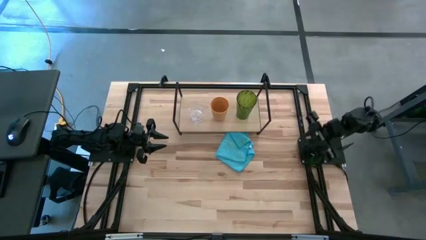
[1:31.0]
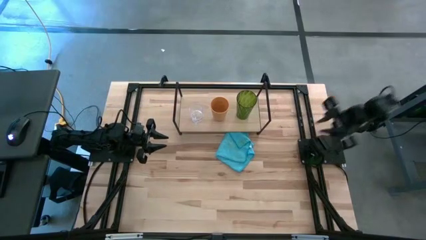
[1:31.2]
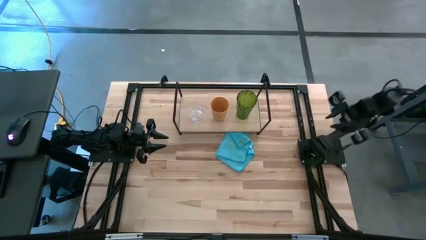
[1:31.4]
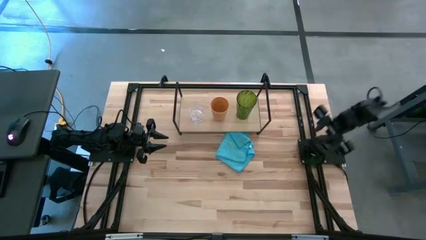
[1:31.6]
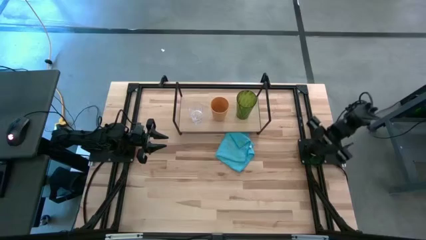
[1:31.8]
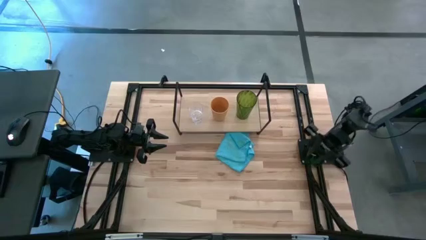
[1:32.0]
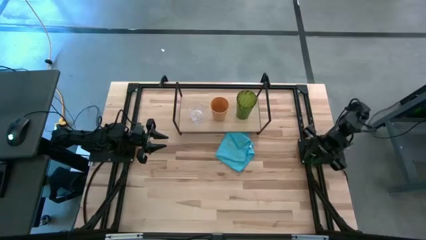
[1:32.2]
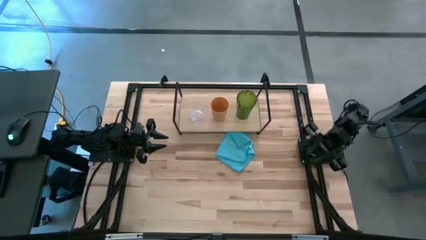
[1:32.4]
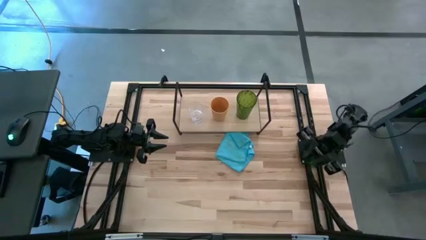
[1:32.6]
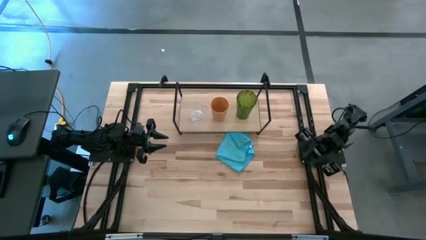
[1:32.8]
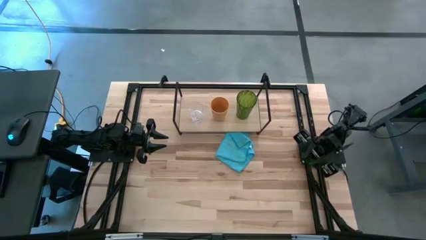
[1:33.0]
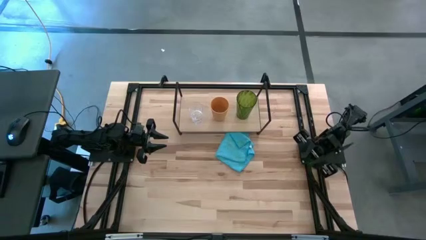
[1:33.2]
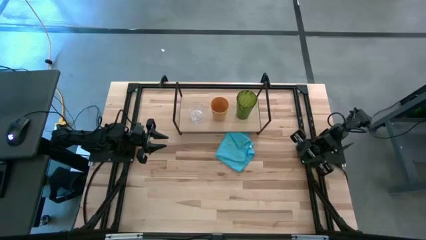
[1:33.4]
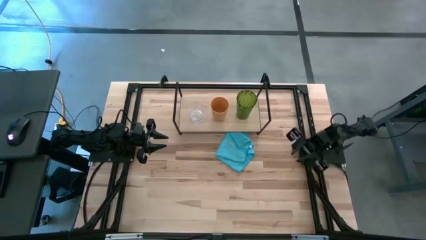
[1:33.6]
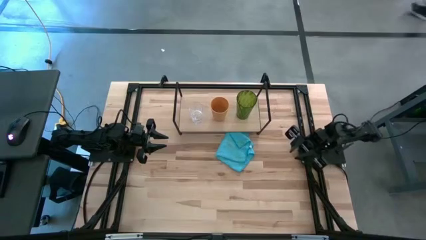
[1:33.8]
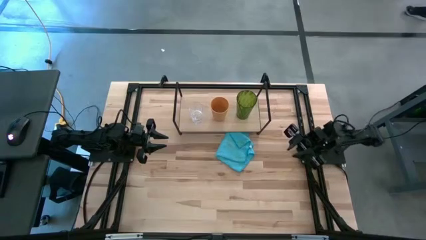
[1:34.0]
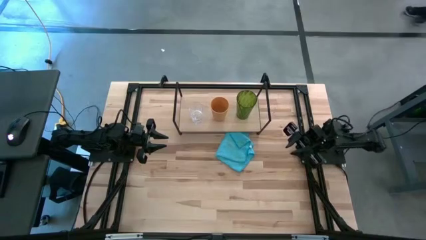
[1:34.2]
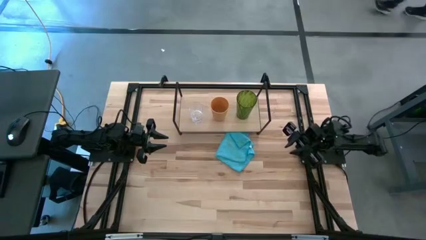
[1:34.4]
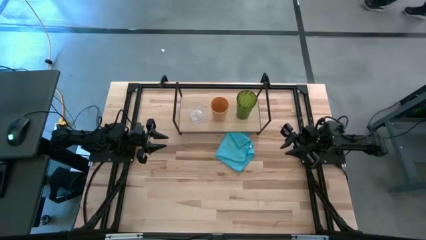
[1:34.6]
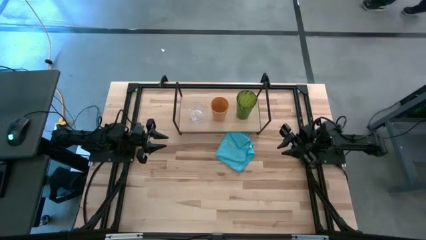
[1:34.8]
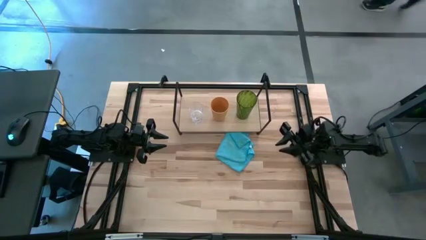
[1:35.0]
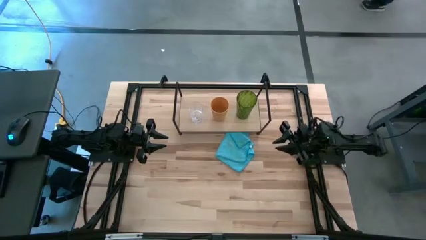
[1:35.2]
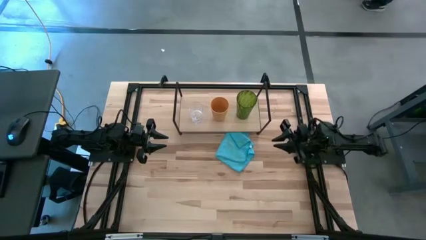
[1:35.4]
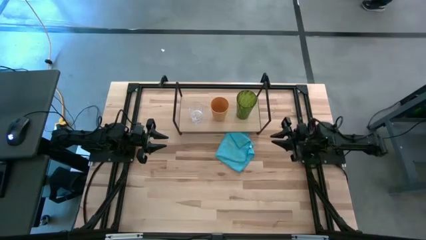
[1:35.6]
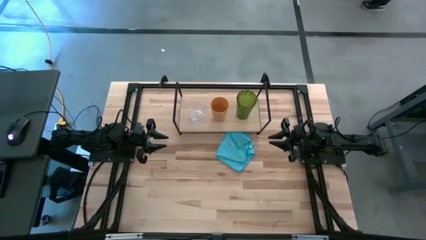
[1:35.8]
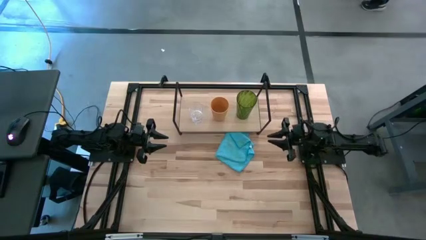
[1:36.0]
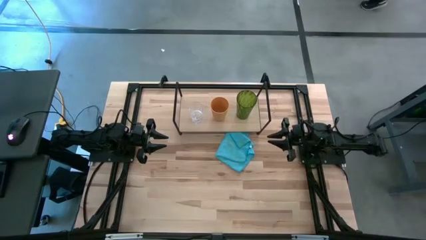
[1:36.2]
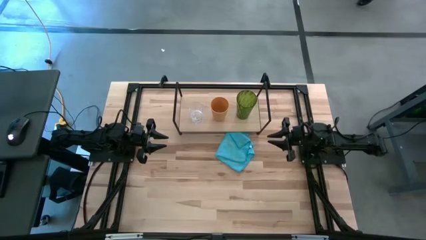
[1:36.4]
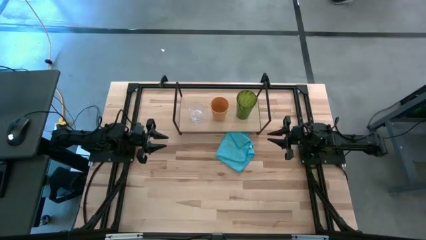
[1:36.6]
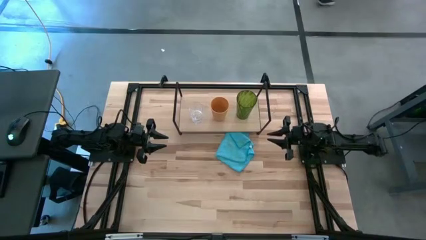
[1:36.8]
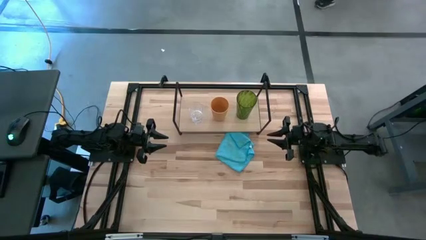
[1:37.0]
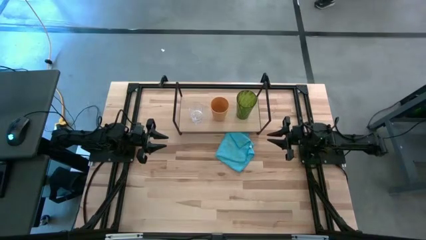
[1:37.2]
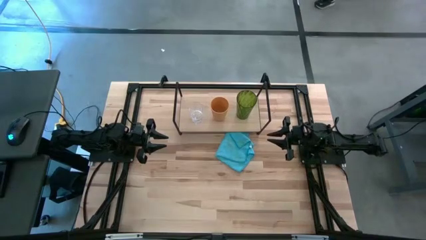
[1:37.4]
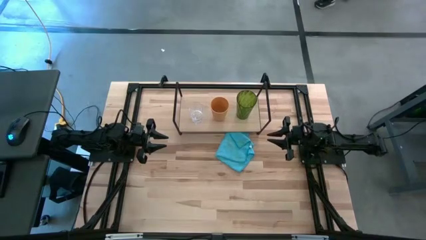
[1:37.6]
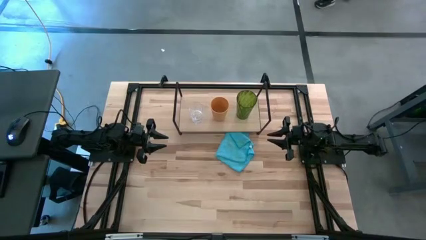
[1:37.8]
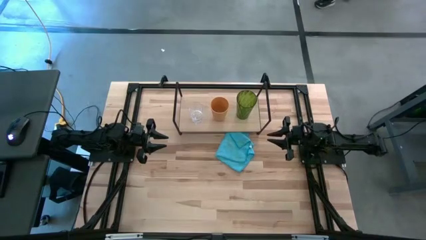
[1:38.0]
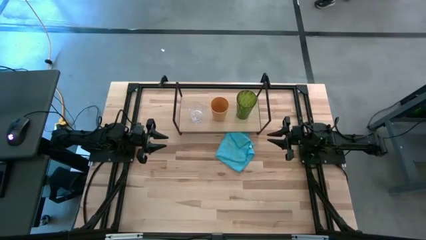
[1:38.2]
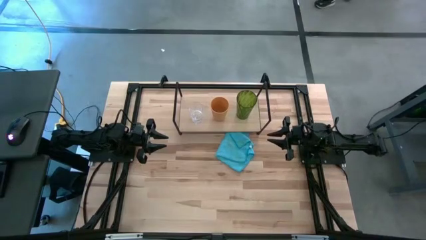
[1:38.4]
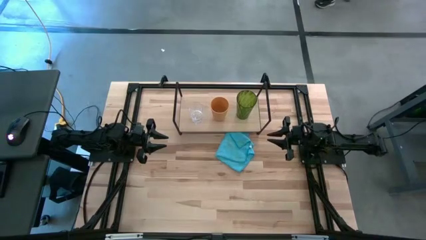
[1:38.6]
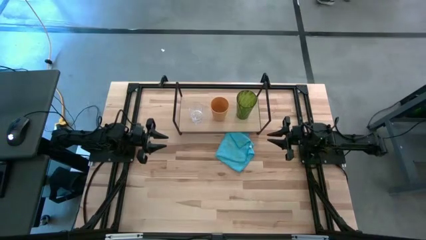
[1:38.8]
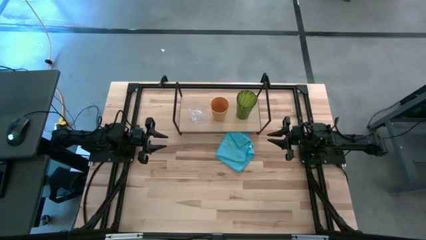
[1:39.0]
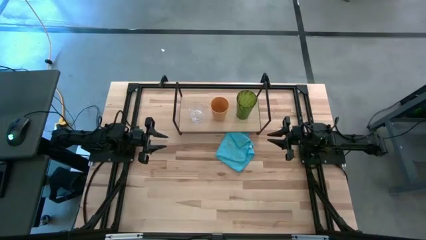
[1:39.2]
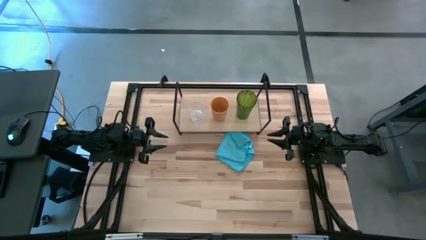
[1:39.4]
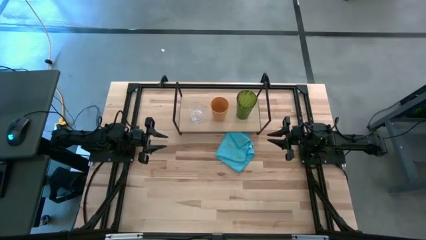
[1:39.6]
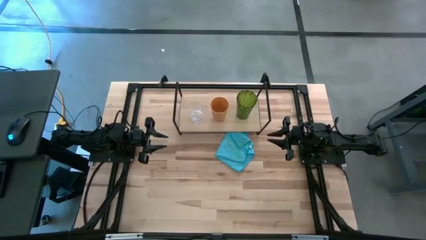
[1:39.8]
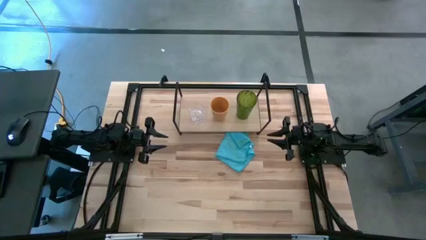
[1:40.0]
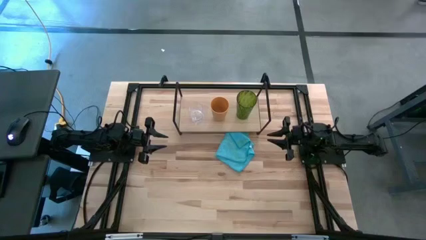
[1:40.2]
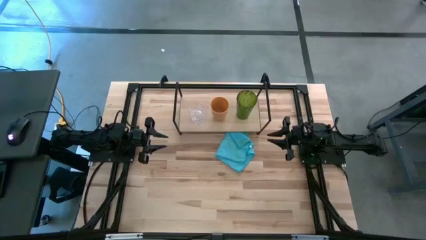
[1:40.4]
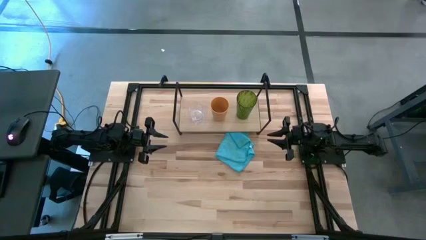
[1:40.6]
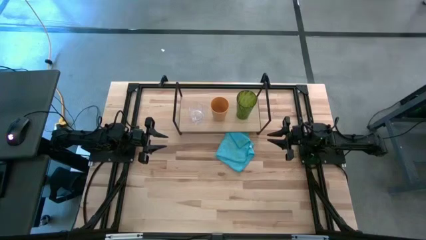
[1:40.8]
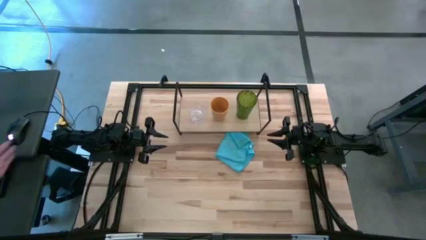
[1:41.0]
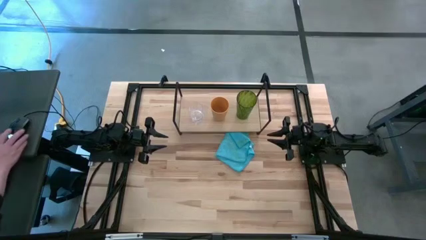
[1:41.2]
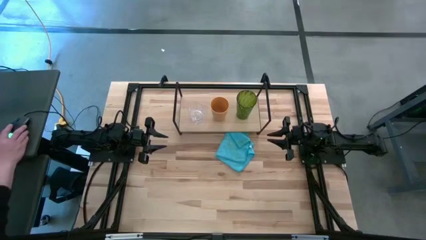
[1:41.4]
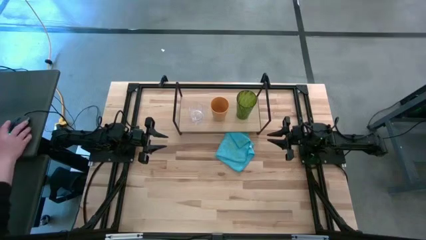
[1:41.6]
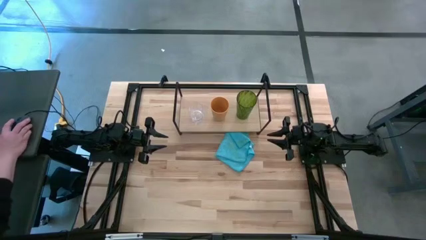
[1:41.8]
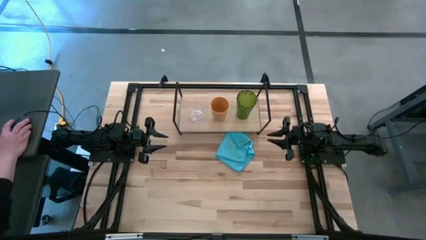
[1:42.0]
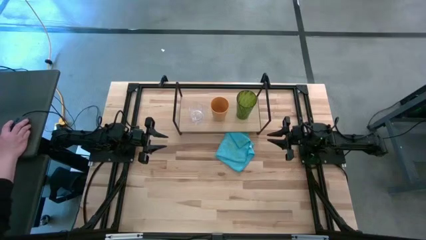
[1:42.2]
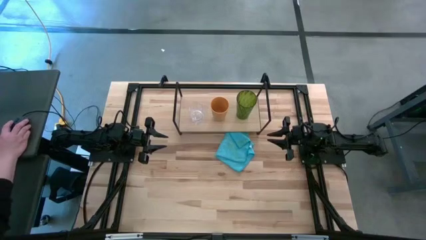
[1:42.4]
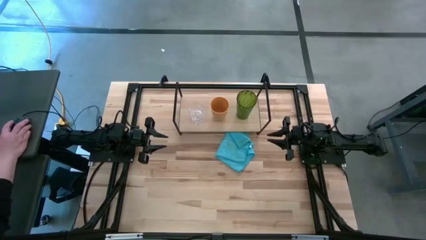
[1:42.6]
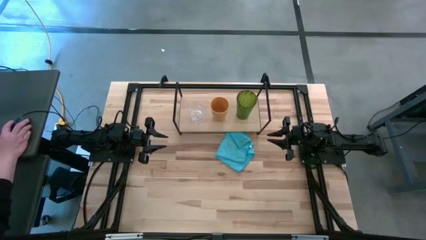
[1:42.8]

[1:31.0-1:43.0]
Task: Stack small to large cups/mugs on shelf
Return to Home Position
